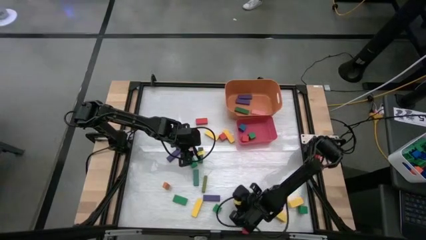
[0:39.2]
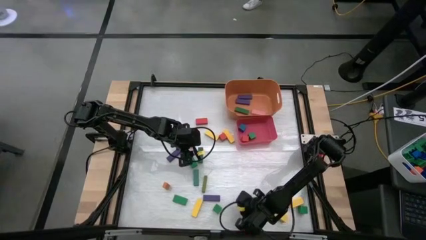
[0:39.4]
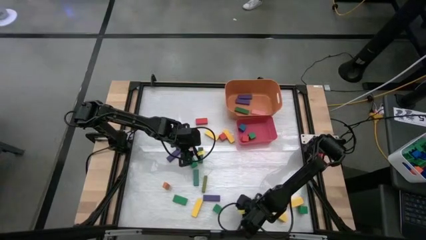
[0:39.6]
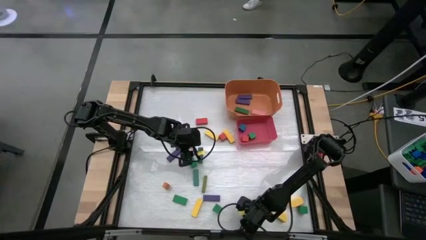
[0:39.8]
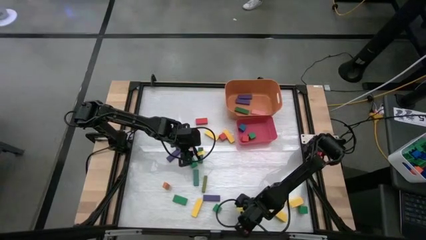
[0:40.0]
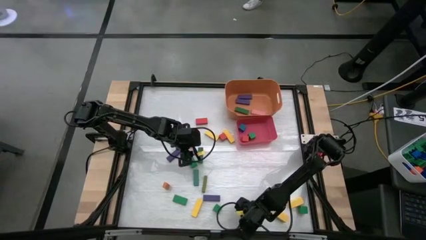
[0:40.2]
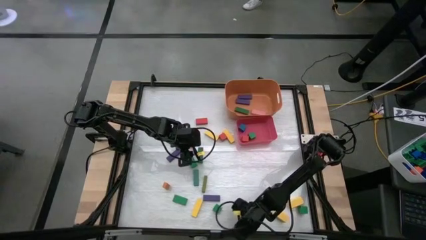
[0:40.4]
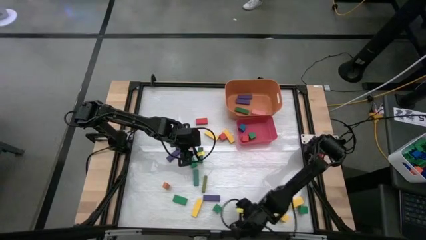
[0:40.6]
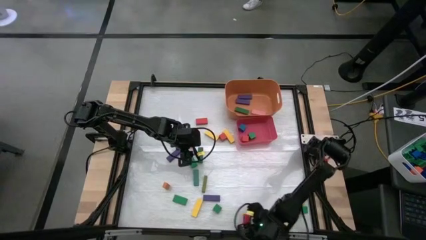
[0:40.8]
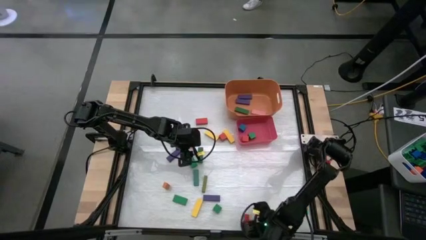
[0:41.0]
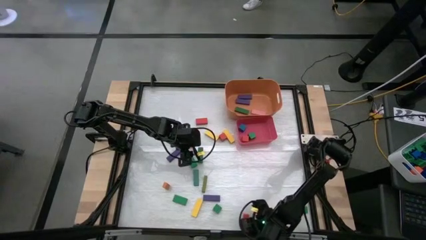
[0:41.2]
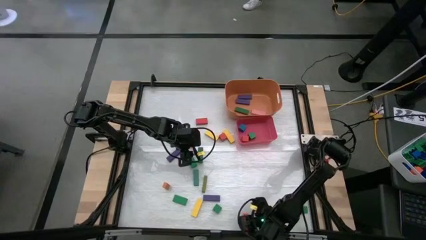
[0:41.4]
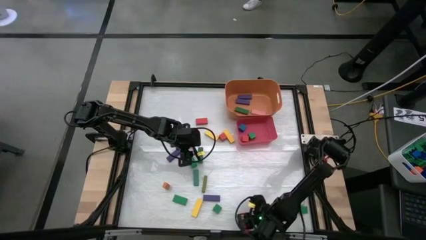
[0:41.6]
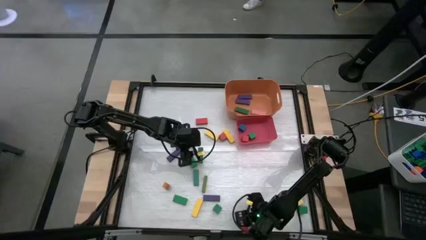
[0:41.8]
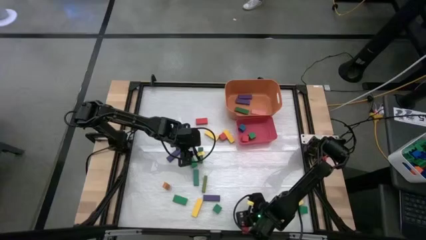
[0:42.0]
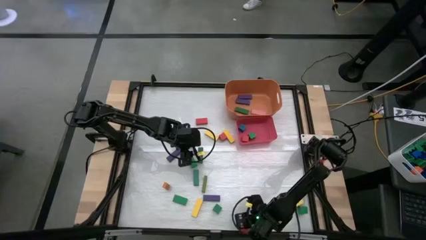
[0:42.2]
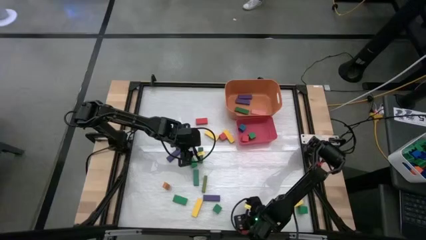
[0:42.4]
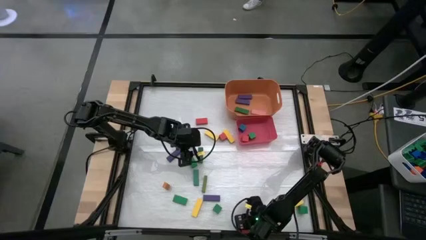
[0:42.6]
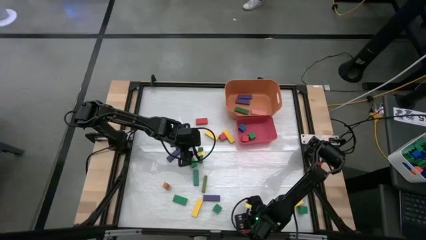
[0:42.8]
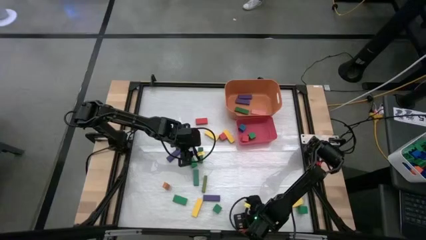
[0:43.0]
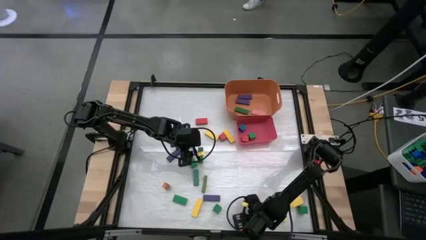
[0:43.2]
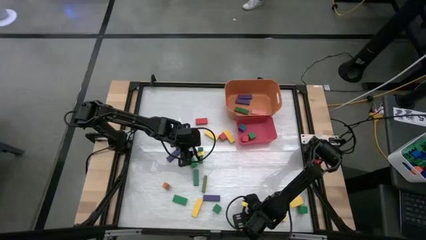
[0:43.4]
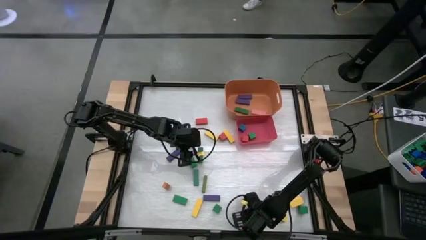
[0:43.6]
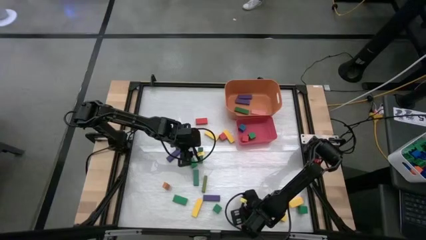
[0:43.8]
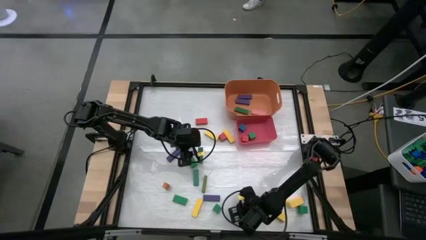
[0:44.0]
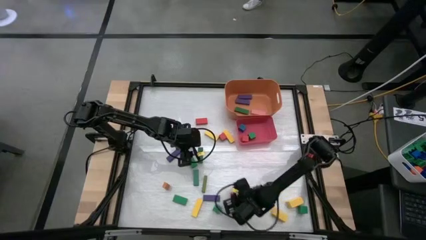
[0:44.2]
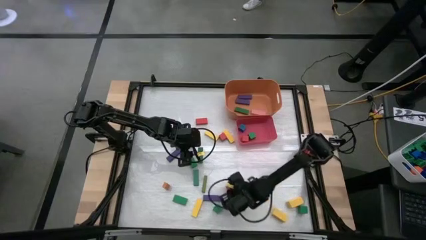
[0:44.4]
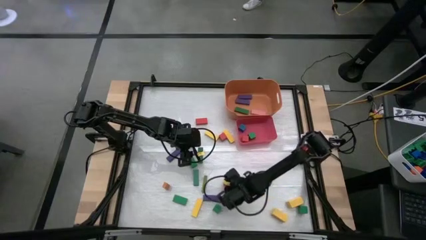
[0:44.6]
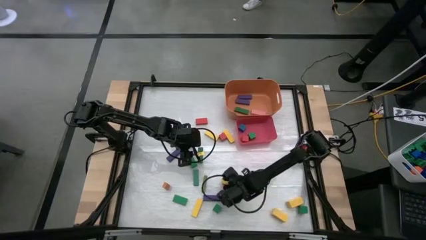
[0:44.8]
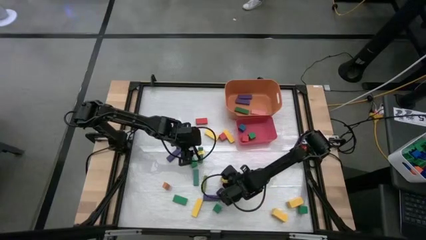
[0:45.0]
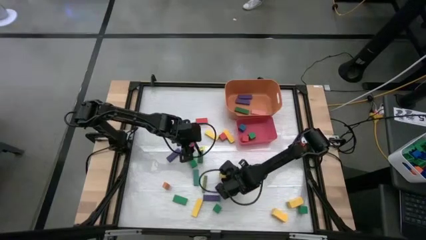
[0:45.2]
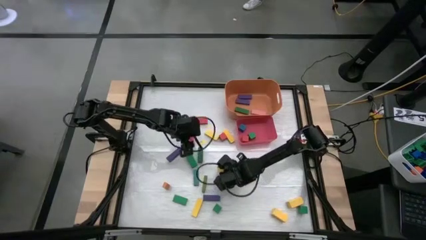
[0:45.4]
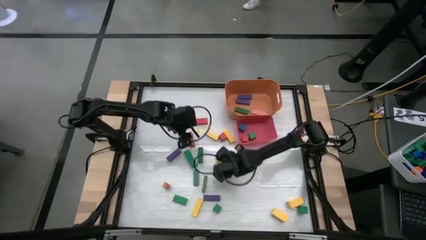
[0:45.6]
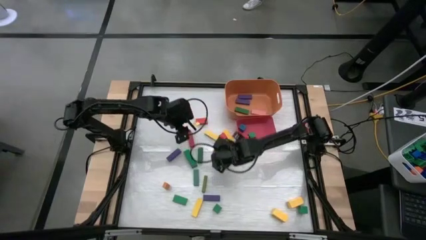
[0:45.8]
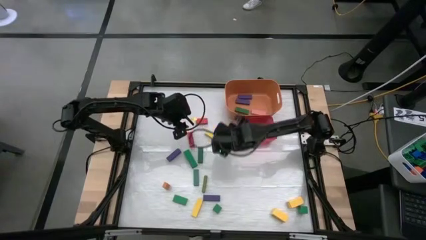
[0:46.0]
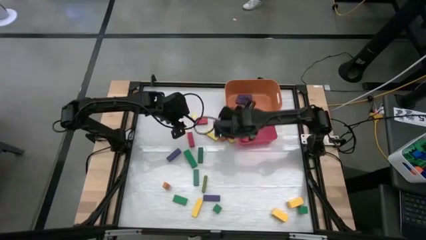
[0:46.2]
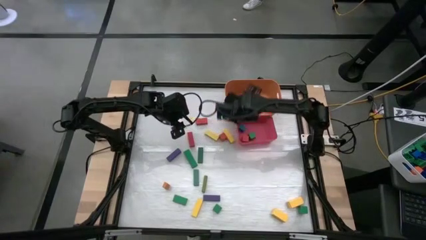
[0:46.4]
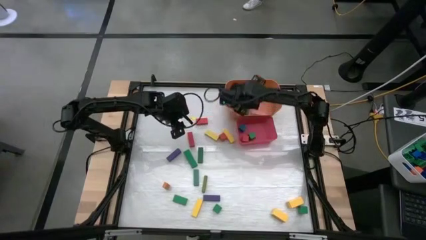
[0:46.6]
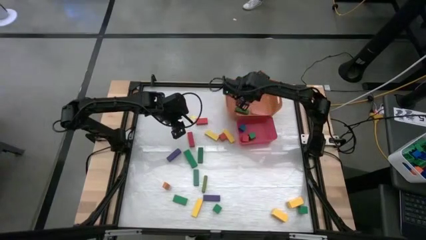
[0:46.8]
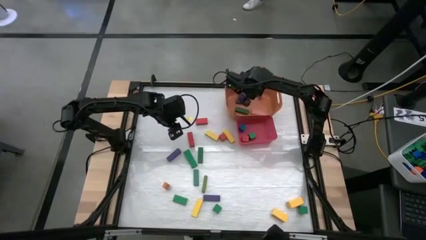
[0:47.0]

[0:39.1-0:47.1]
Task: Sort blocks by size
Put the red rectangle block into the orange bin

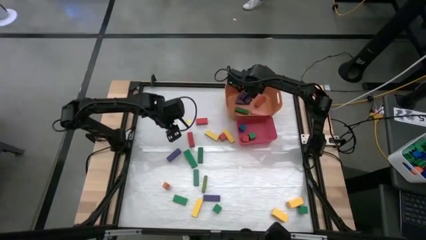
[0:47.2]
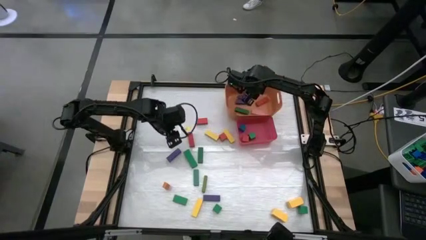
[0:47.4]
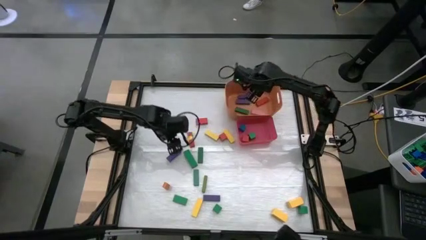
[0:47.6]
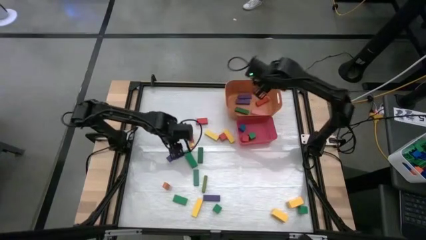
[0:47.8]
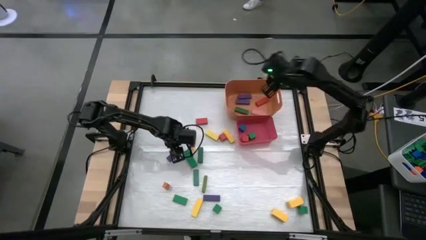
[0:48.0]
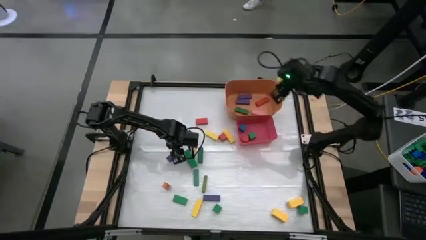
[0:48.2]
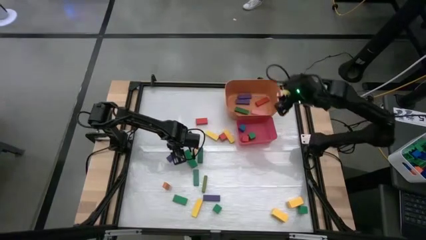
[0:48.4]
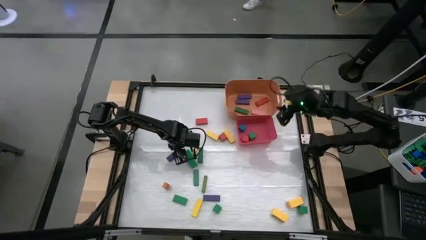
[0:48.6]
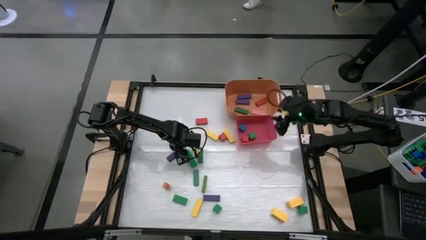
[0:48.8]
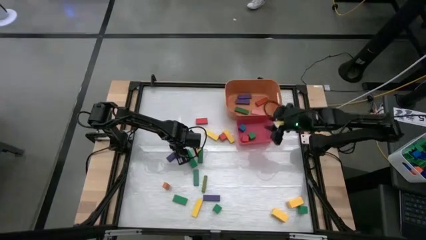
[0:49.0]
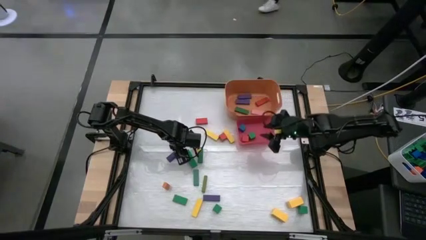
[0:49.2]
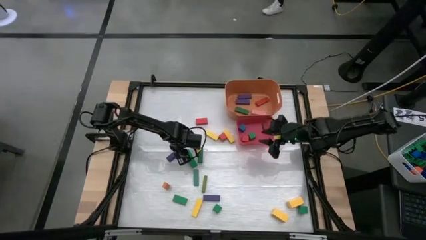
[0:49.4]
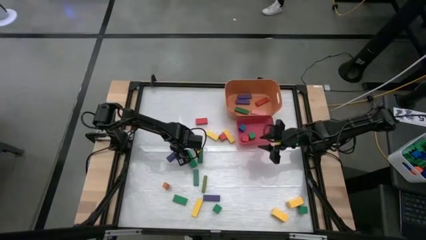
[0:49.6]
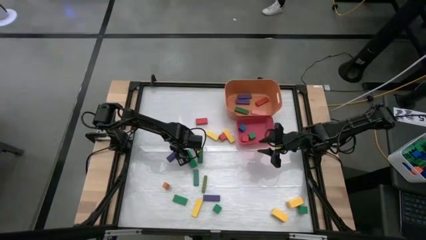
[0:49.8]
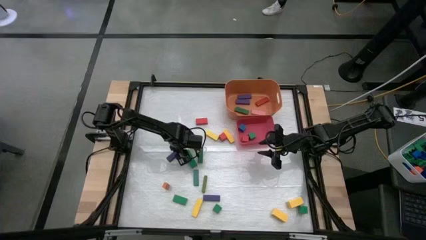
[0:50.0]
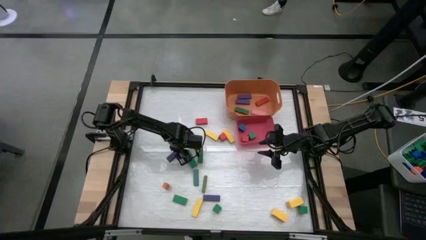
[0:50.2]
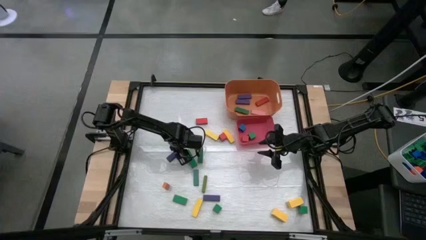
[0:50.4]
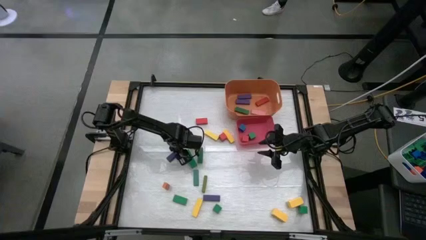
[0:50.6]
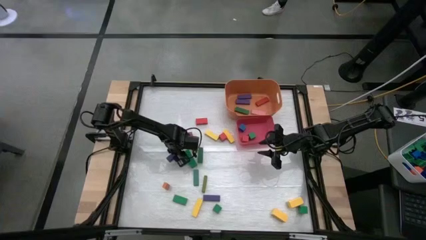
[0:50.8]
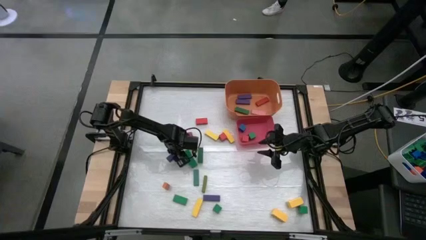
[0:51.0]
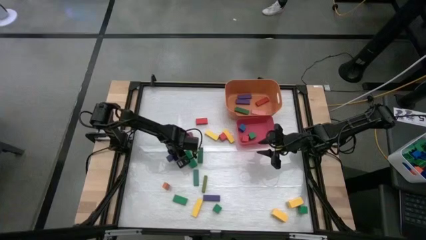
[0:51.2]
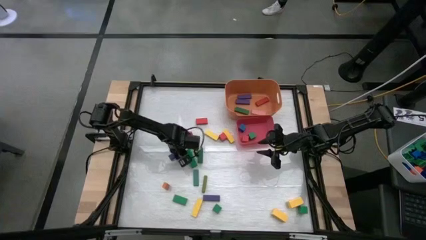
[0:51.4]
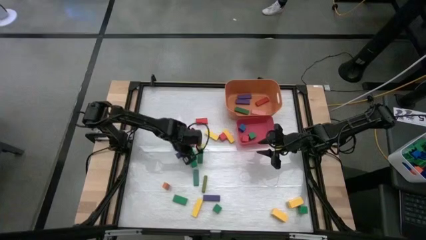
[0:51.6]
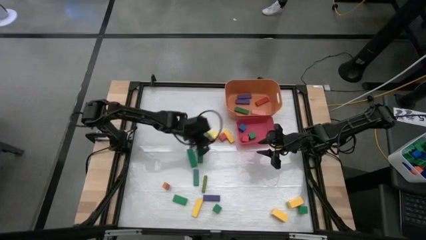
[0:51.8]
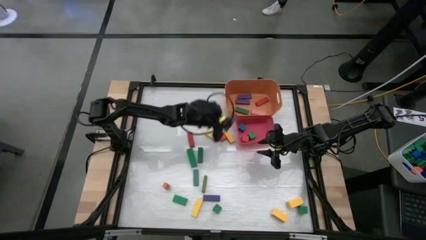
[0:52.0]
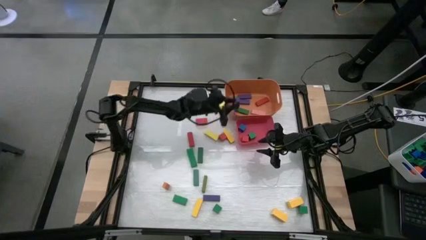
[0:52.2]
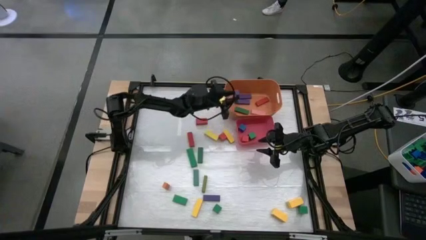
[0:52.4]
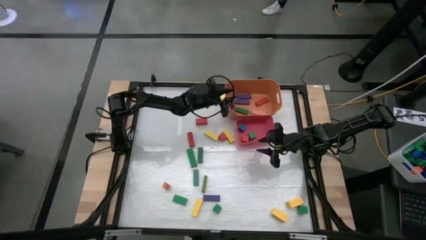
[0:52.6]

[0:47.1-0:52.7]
Put the violet rectangle block into the orange bin

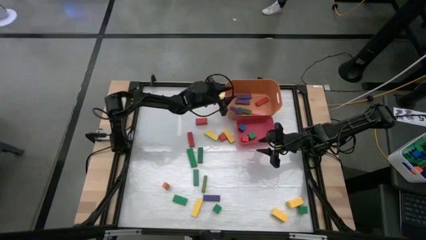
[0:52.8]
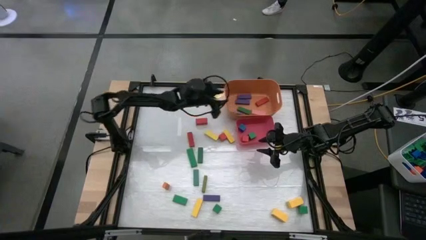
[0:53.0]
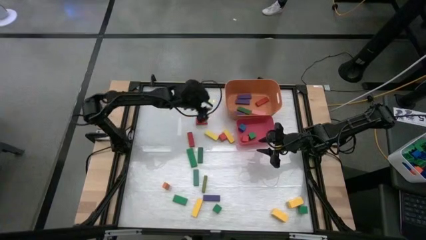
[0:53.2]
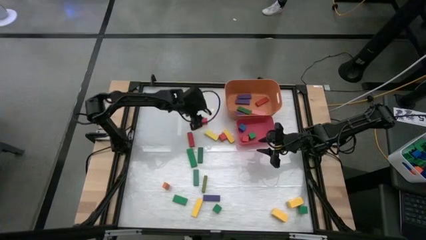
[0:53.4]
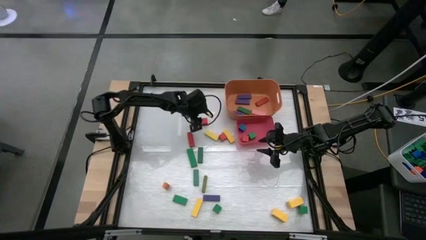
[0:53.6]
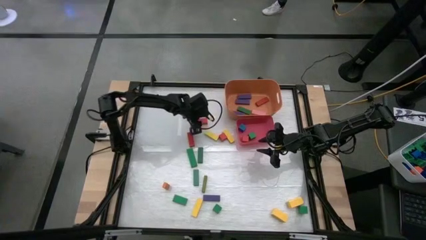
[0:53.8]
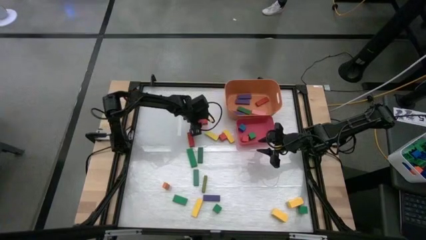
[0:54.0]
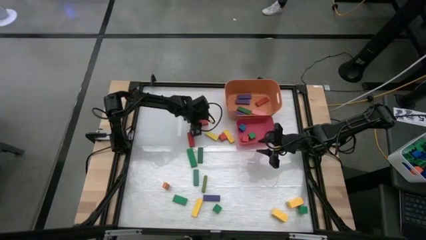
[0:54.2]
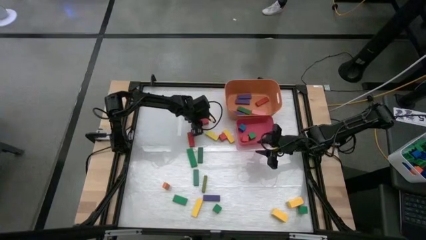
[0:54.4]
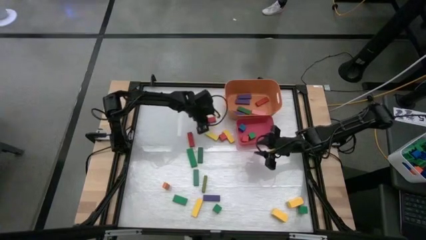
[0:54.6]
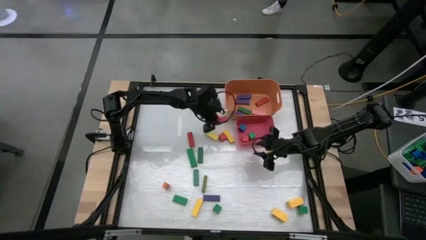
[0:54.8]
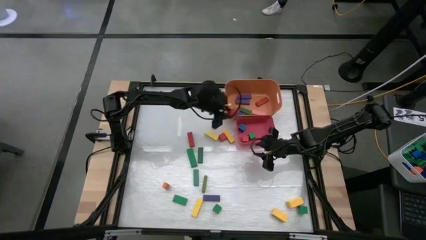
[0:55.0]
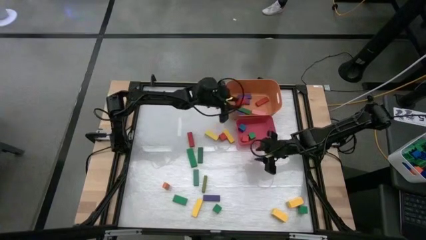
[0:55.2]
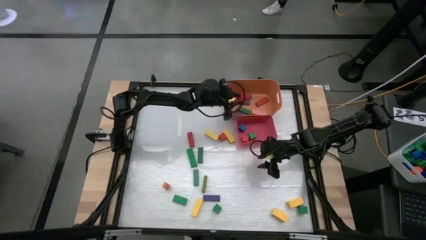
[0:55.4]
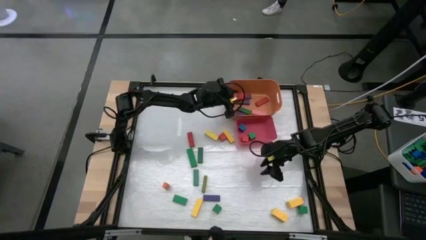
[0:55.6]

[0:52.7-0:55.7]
Put the red rectangle block into the orange bin
